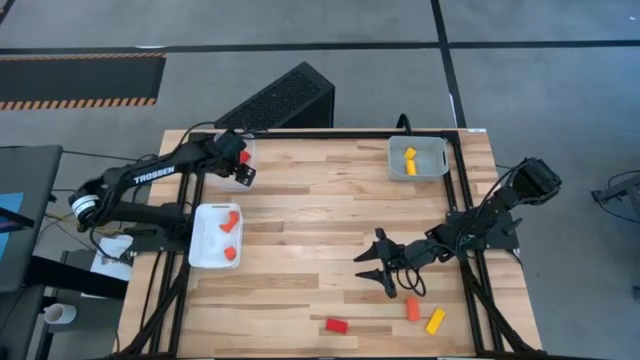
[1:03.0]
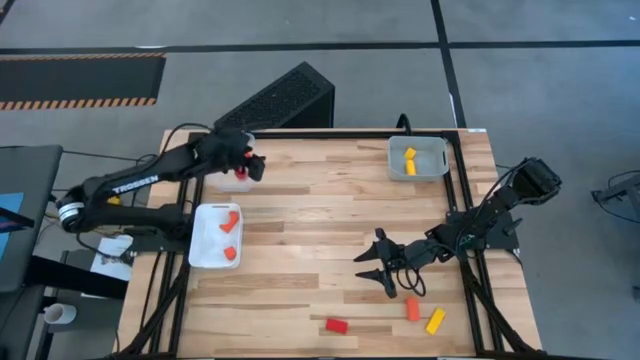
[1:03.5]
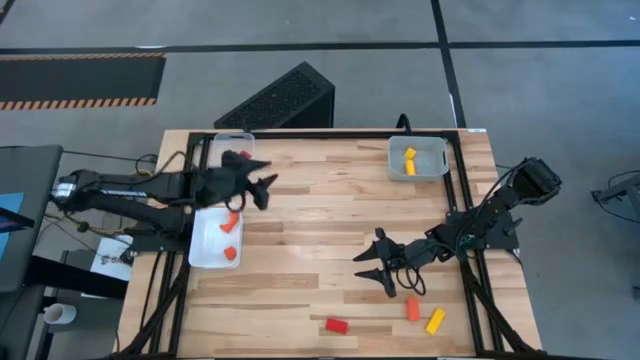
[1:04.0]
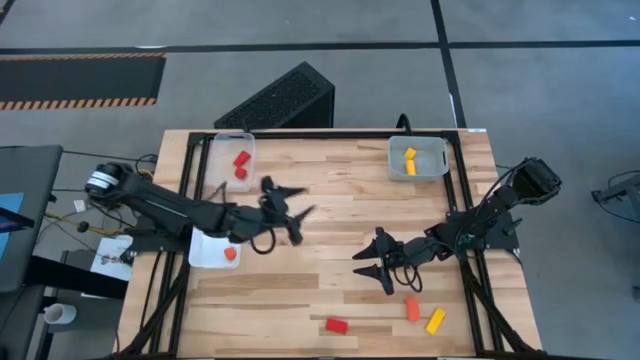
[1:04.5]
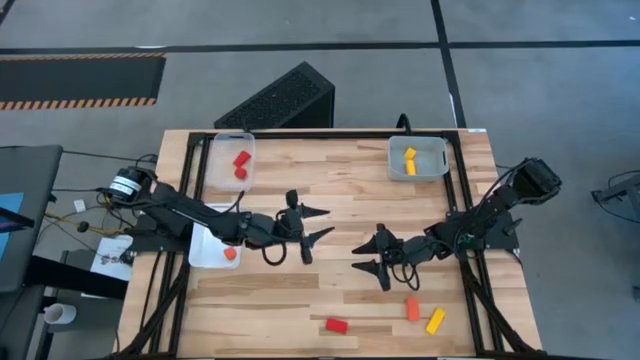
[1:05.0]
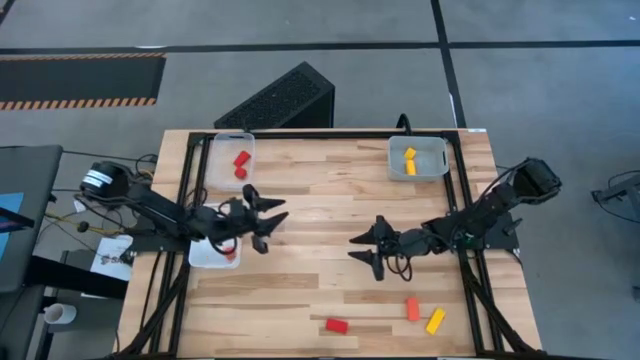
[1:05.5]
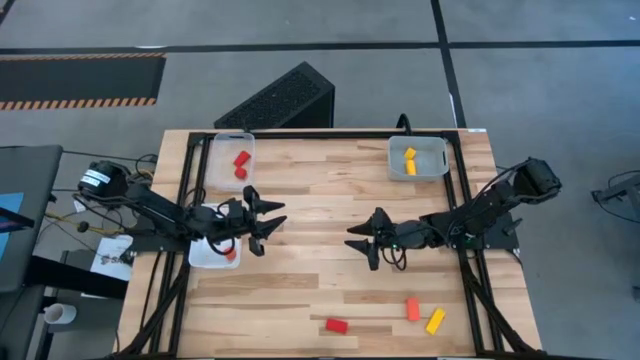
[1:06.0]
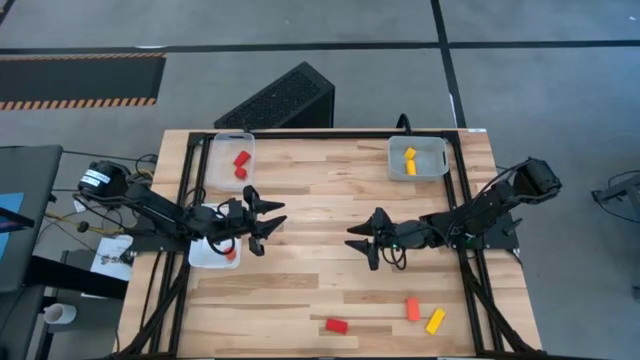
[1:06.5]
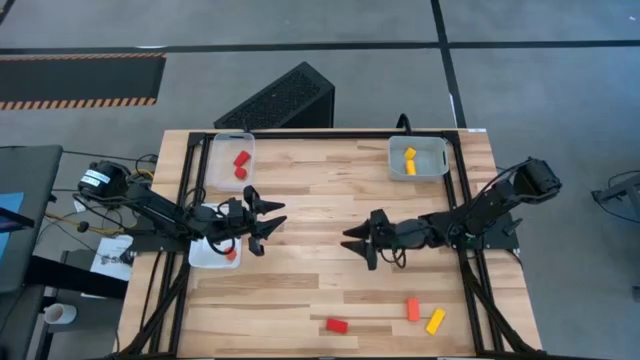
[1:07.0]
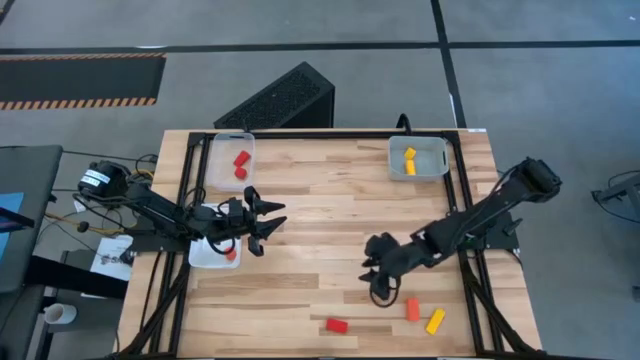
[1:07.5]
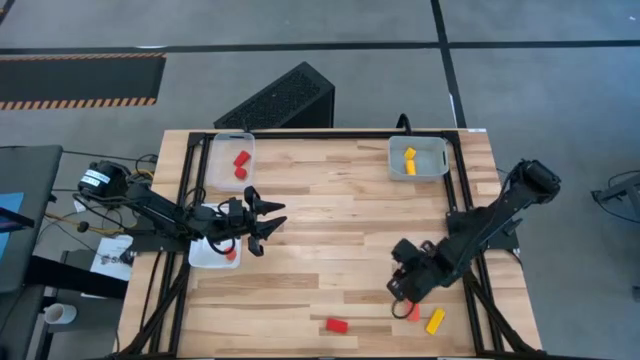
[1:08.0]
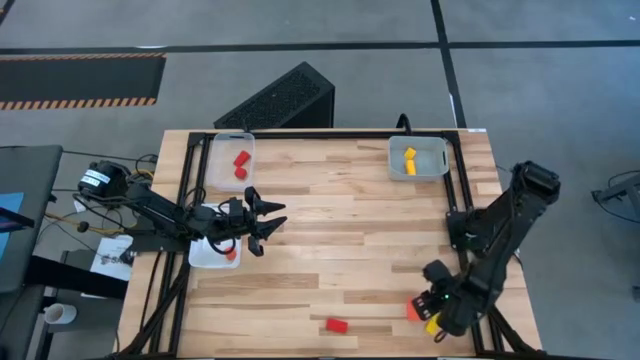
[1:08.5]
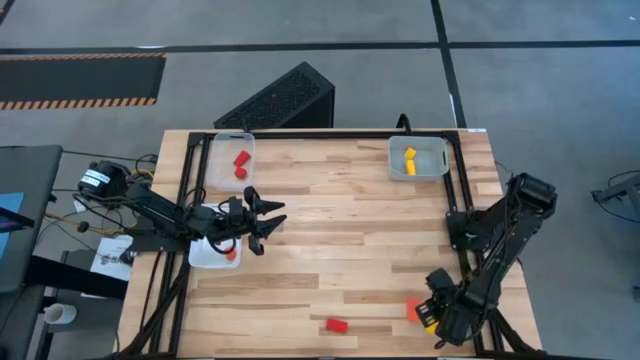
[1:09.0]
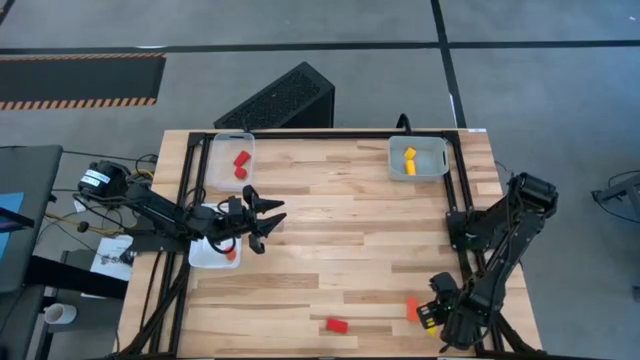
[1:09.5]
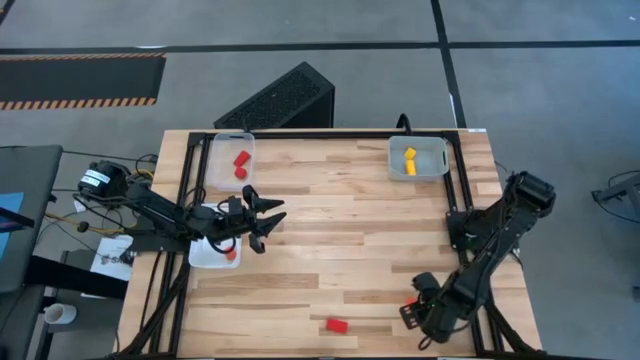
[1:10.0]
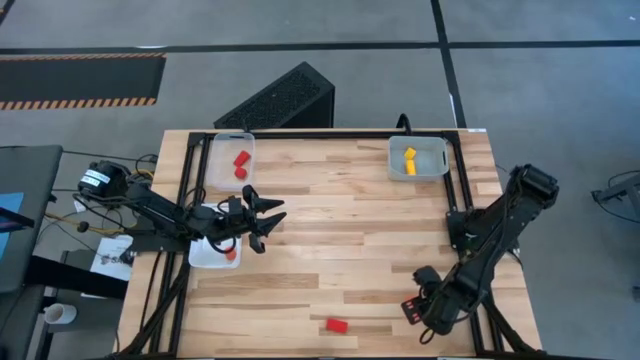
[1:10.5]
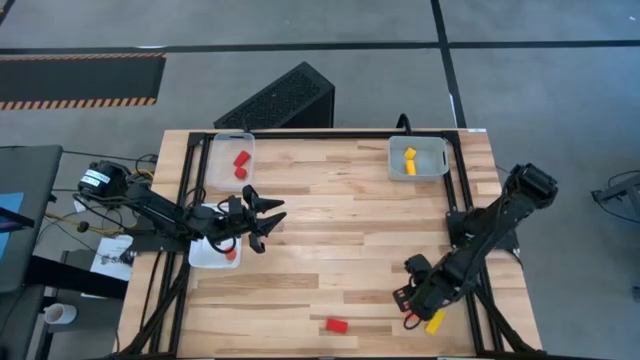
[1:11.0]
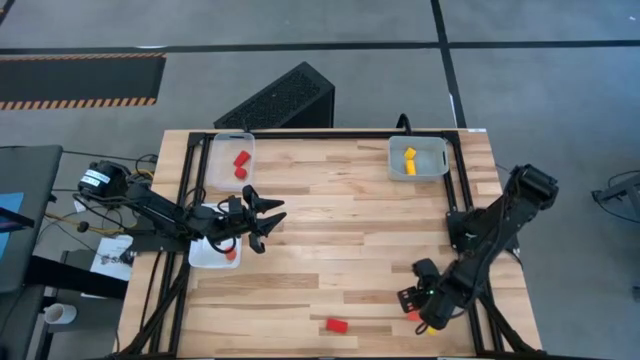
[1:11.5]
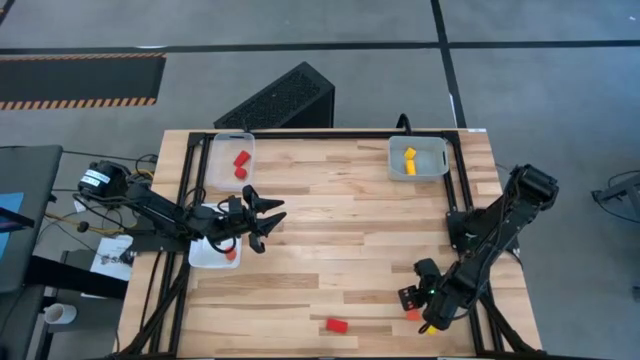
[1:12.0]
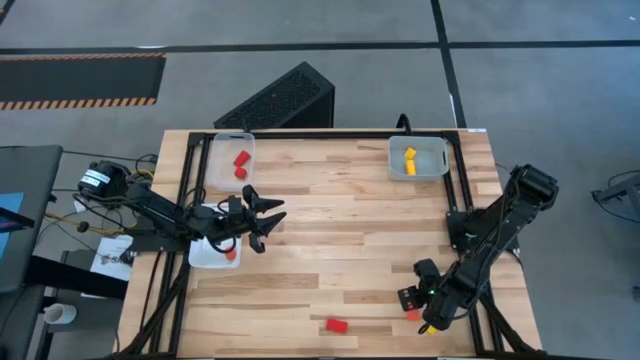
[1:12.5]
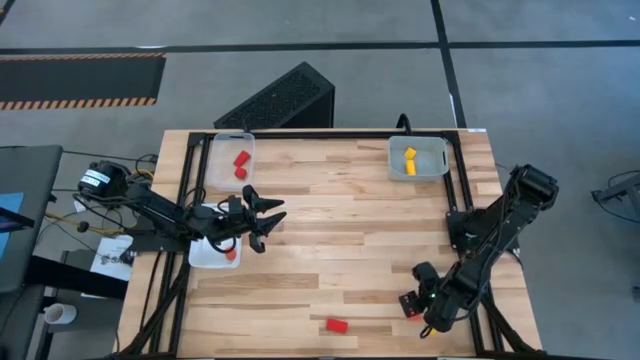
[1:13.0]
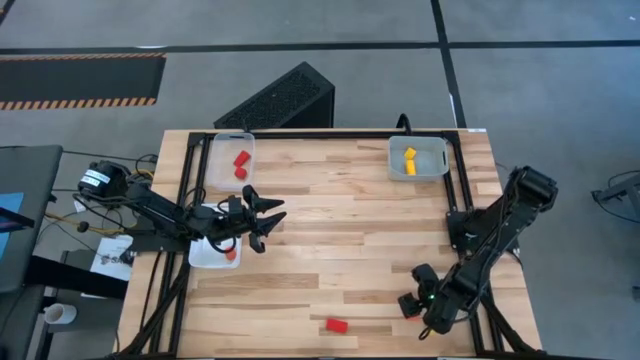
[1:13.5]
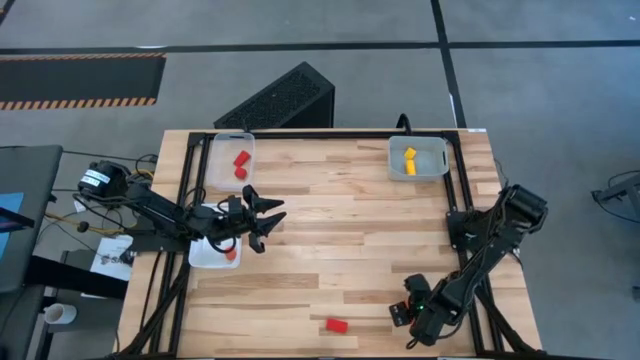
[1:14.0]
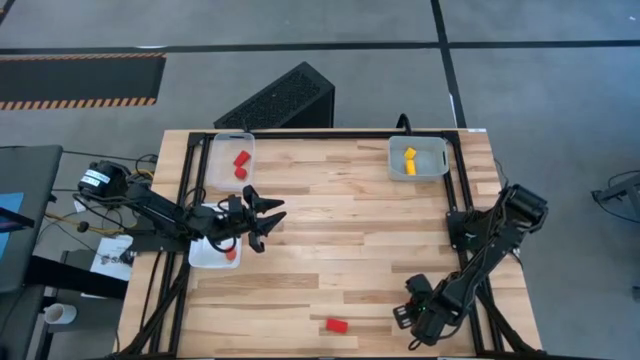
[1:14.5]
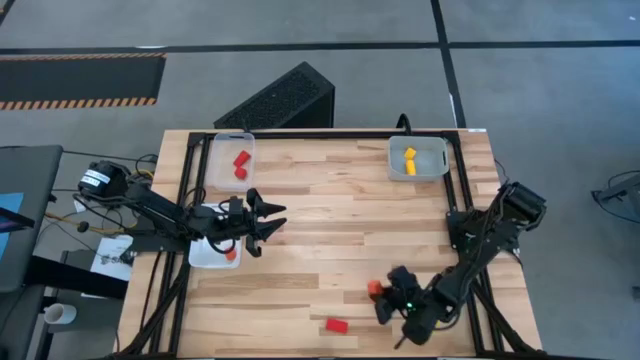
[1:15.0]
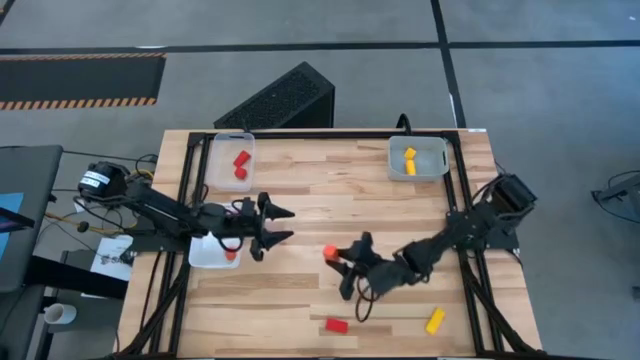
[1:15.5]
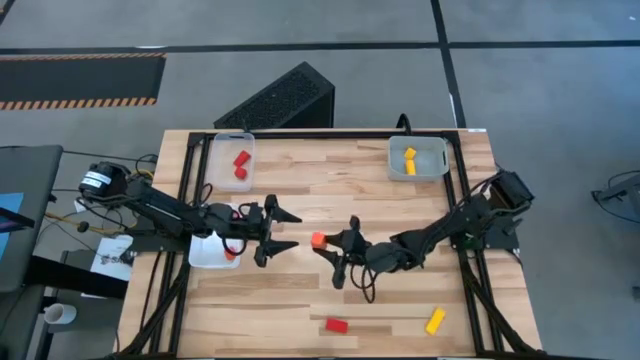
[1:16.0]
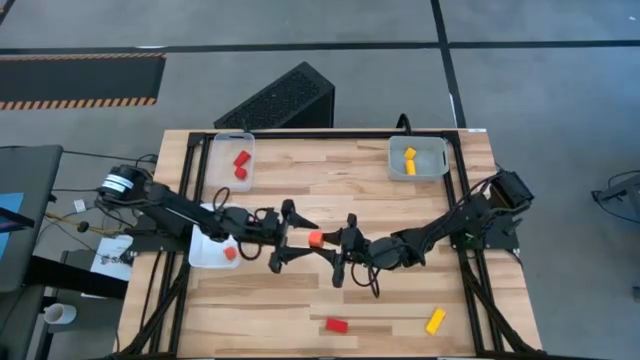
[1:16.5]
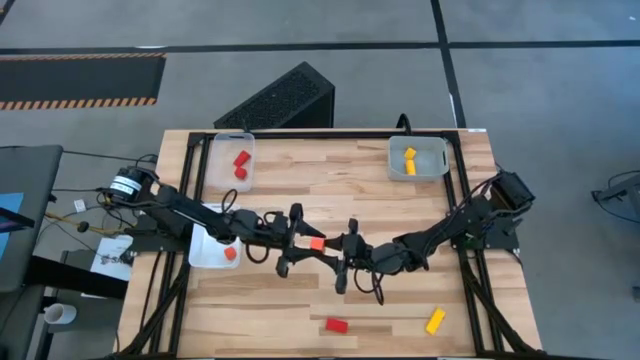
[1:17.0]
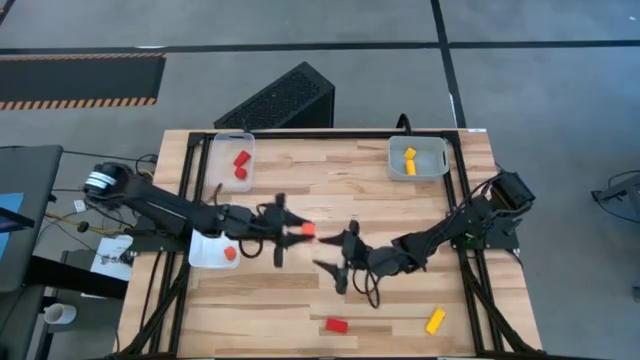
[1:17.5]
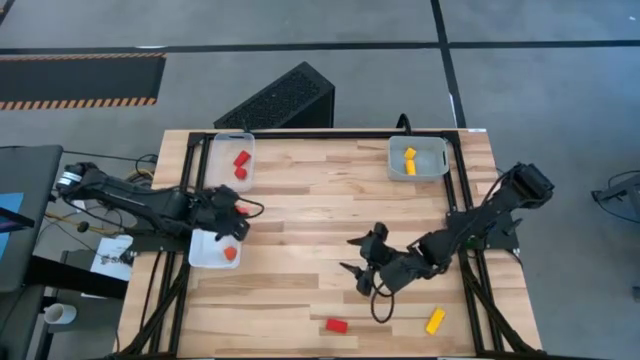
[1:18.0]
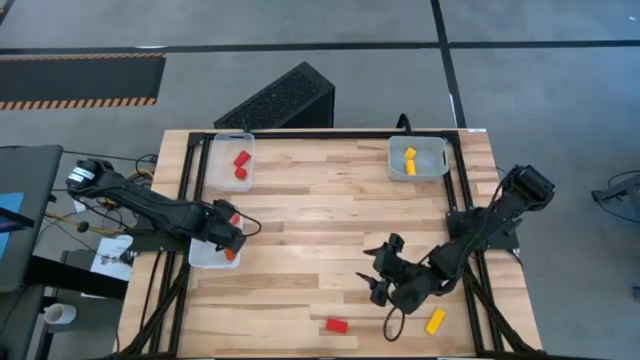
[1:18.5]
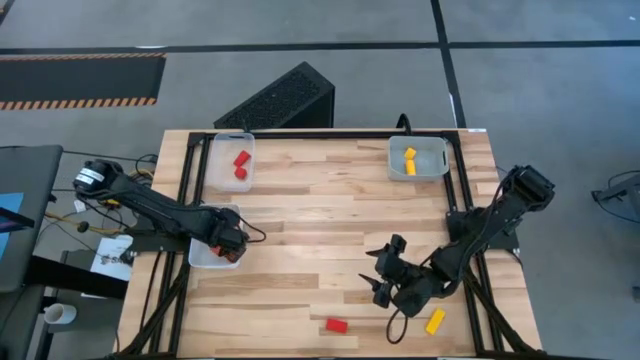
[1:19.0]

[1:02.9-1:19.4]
Task: Sort & place blocks by color
Put the orange block into the white bin

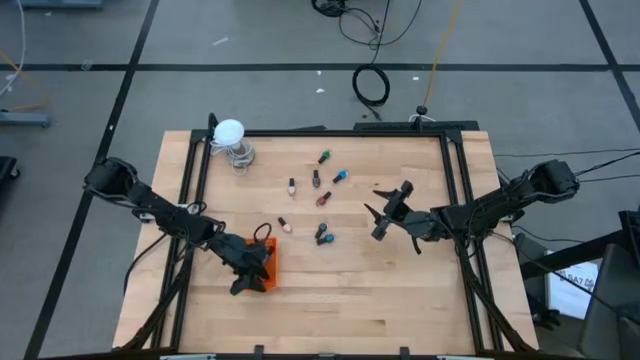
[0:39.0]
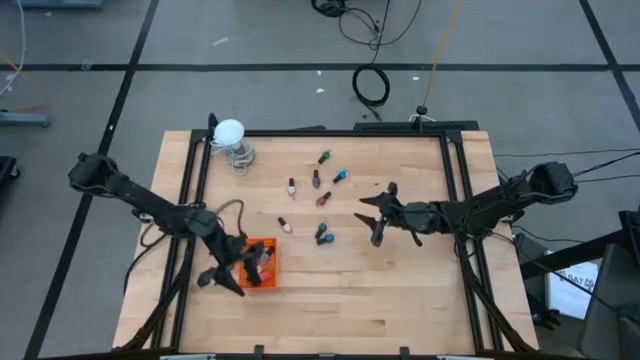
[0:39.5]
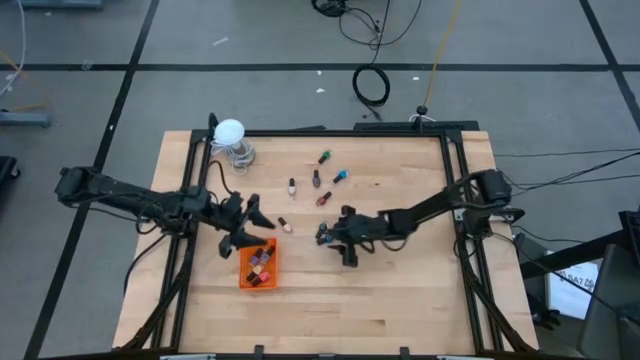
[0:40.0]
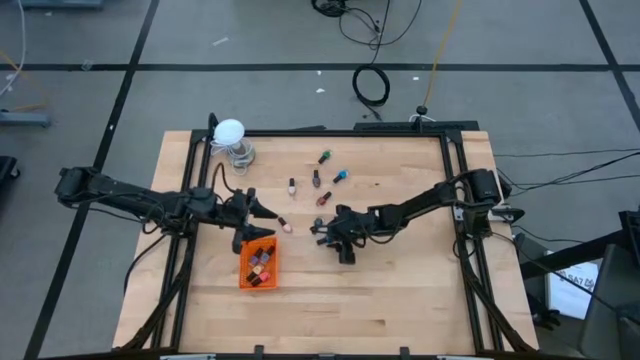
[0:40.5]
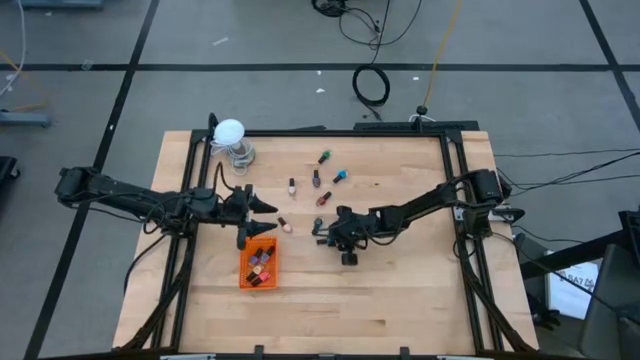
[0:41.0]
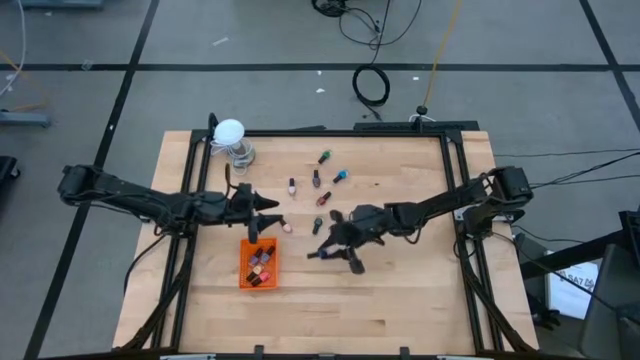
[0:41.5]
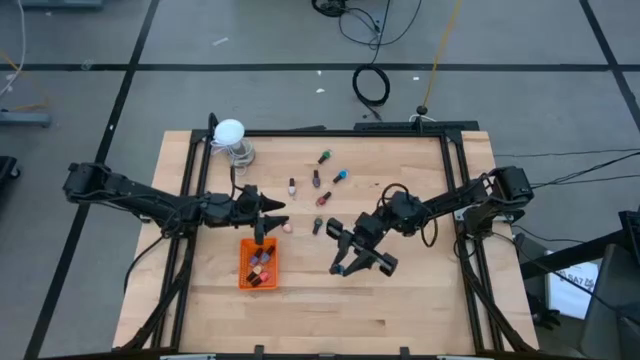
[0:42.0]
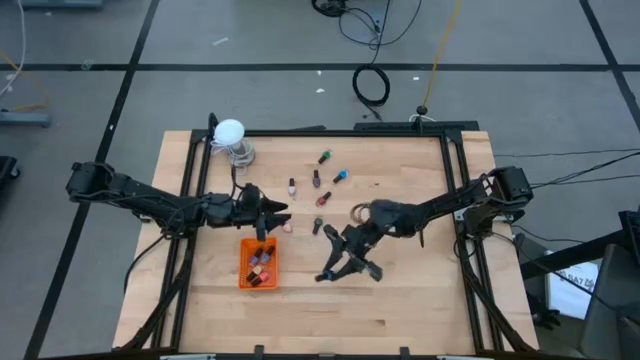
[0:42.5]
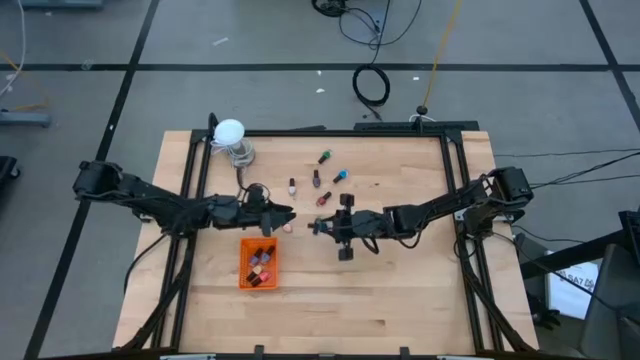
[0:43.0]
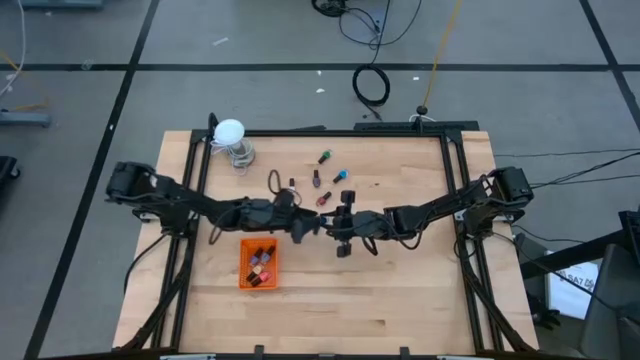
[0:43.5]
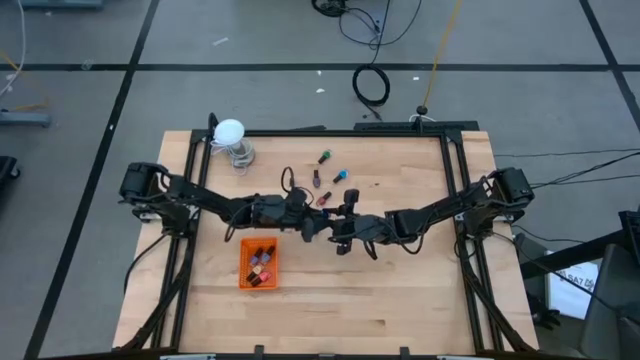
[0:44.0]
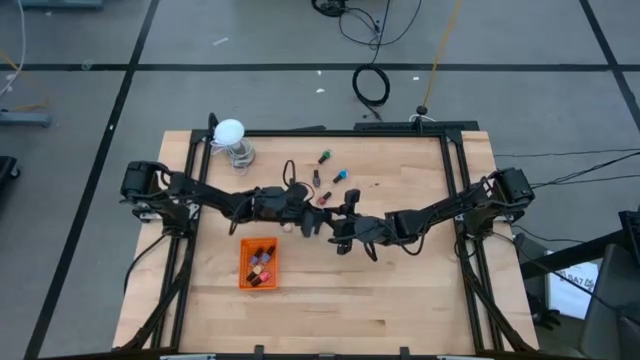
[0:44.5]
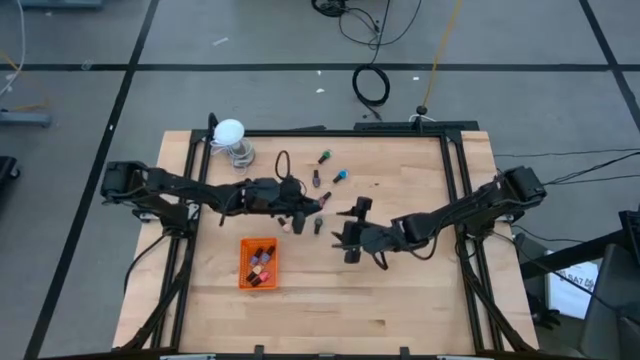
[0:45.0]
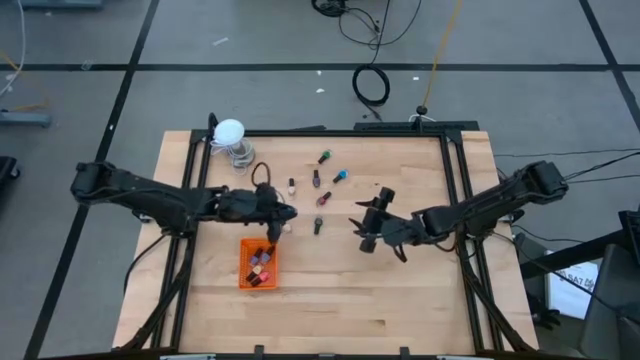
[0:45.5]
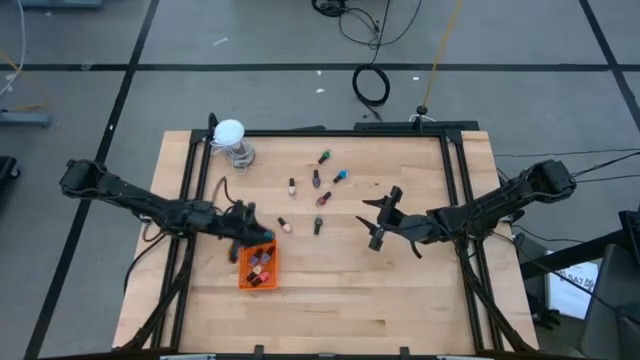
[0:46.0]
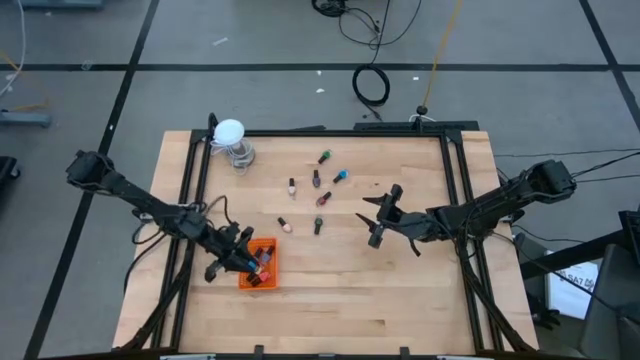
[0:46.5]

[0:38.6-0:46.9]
Task: Pick & Place Nail Polish
Put the bottom blue nail color bottle into the orange bin
